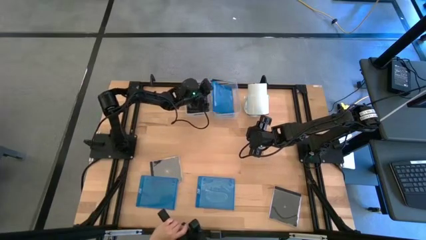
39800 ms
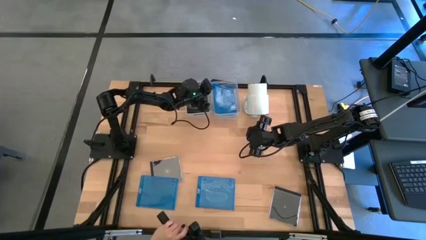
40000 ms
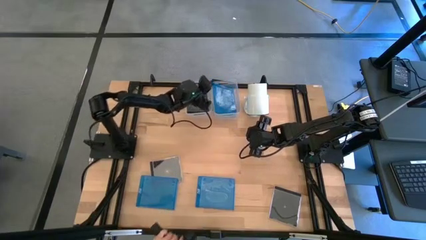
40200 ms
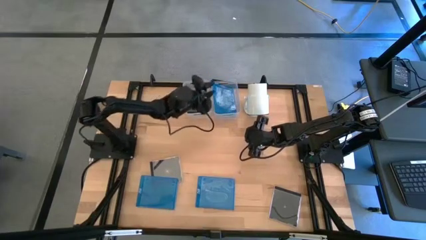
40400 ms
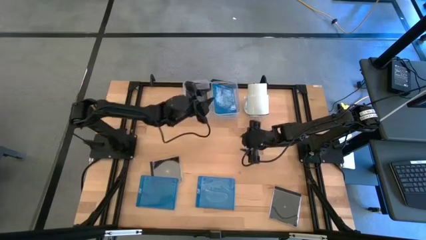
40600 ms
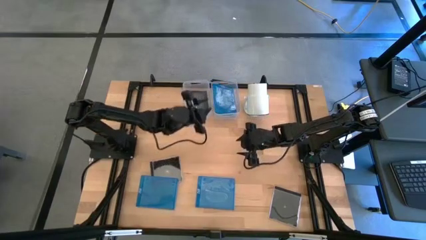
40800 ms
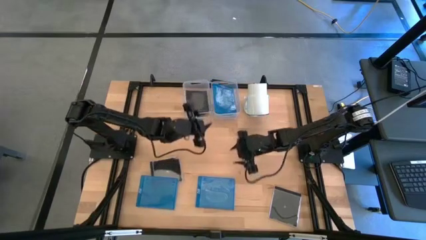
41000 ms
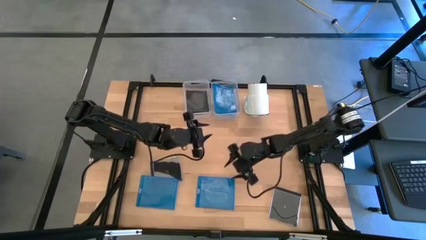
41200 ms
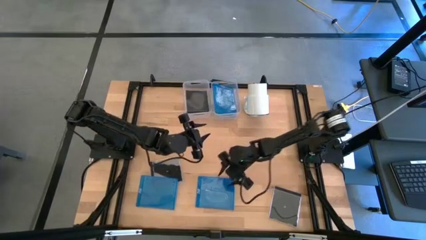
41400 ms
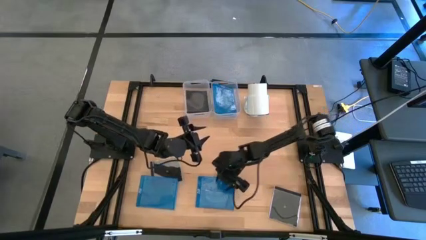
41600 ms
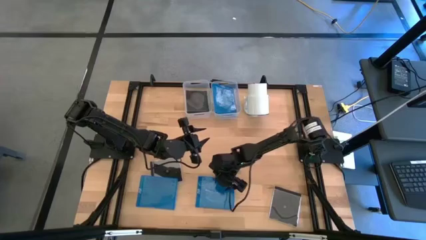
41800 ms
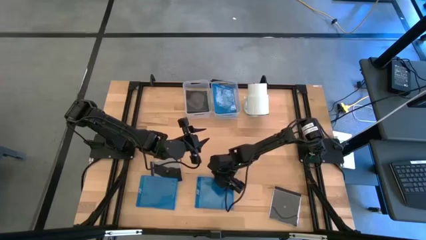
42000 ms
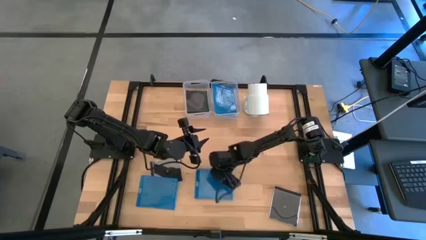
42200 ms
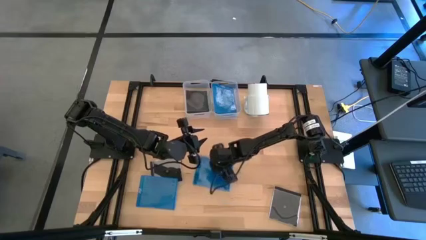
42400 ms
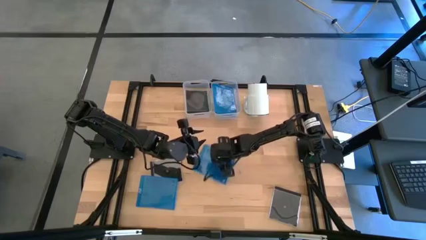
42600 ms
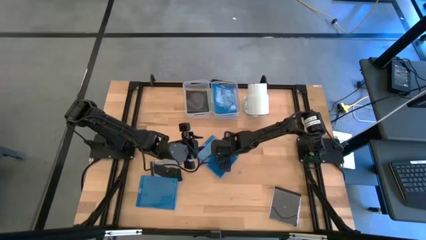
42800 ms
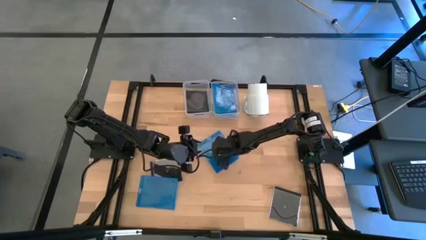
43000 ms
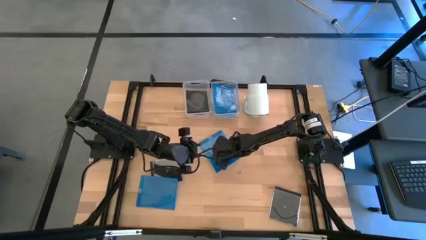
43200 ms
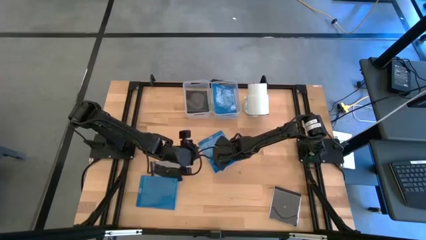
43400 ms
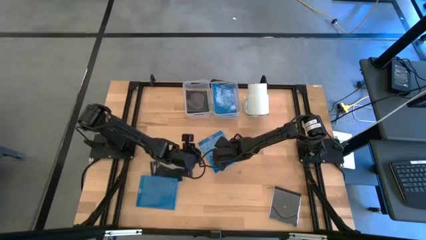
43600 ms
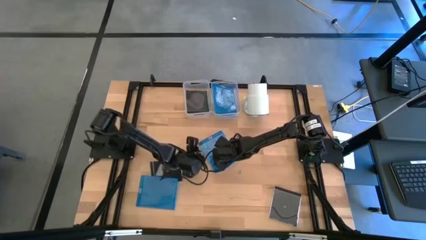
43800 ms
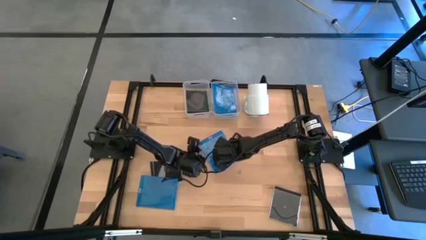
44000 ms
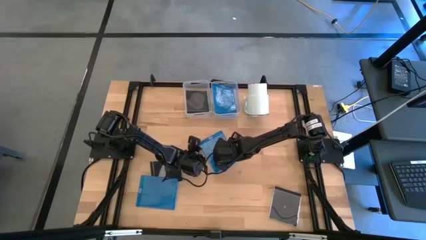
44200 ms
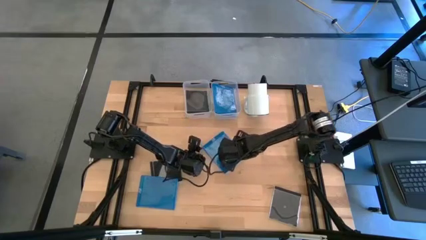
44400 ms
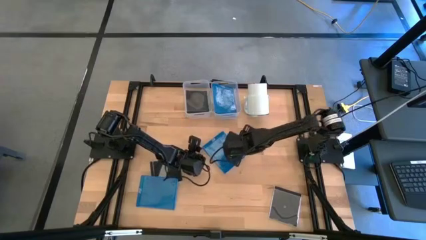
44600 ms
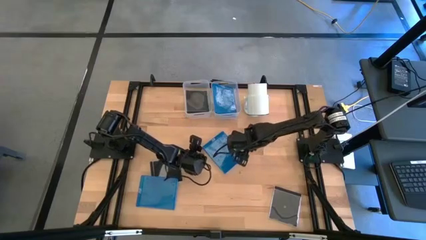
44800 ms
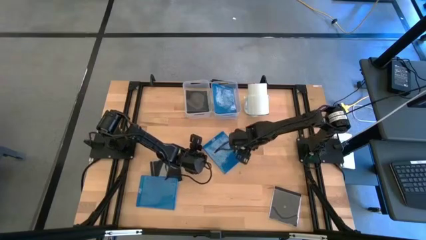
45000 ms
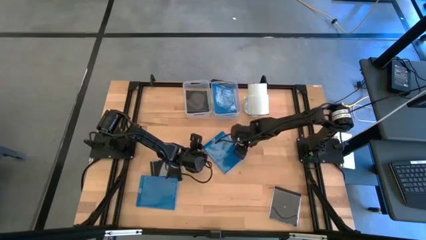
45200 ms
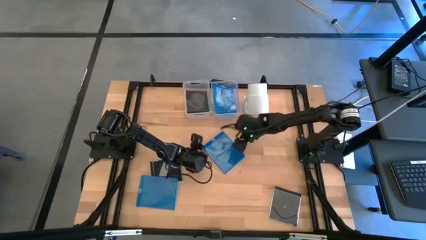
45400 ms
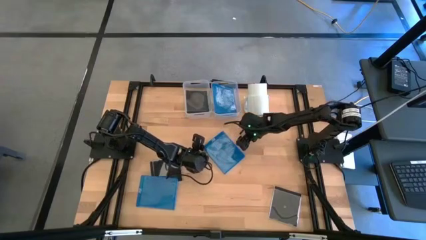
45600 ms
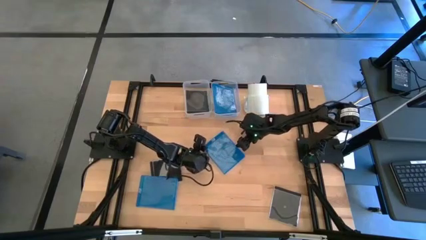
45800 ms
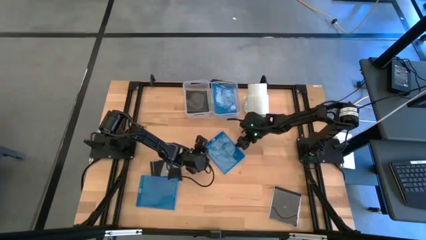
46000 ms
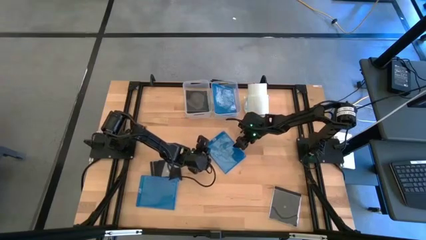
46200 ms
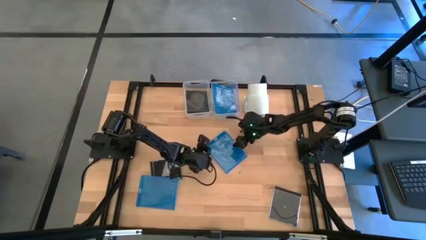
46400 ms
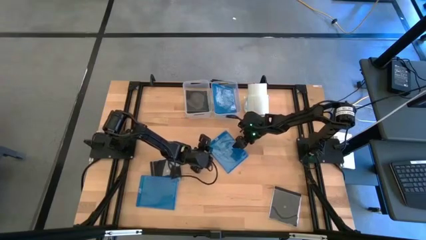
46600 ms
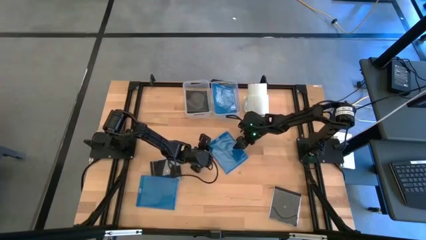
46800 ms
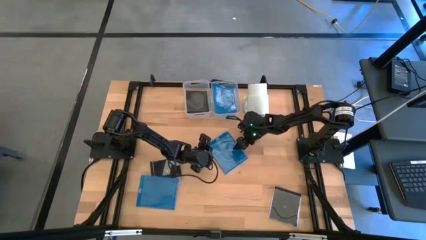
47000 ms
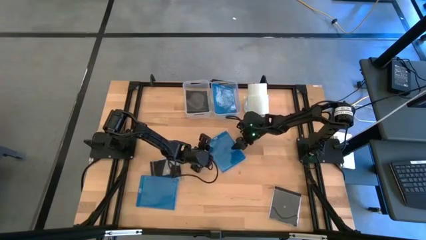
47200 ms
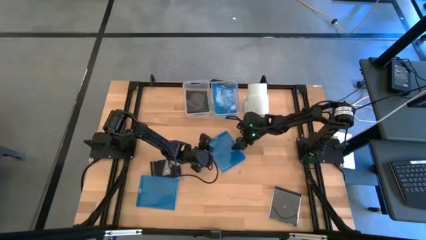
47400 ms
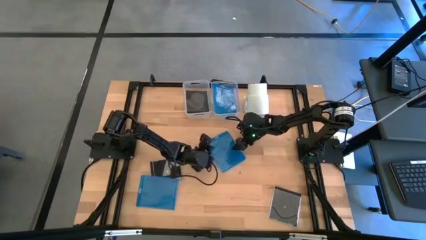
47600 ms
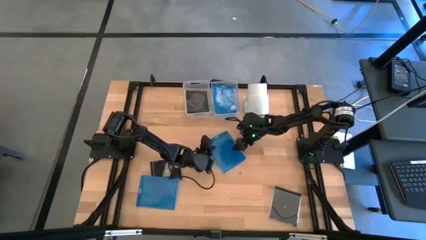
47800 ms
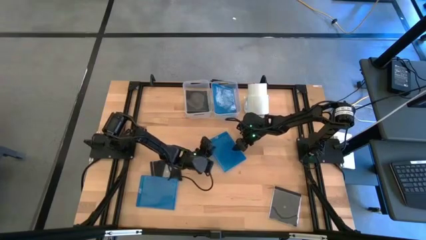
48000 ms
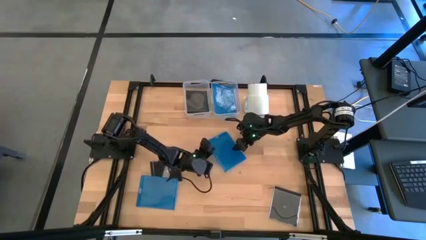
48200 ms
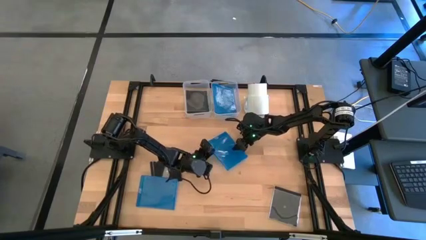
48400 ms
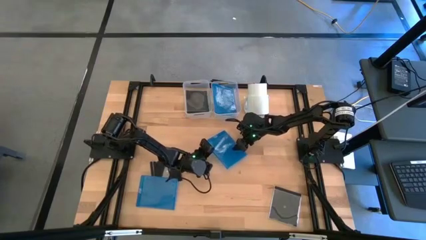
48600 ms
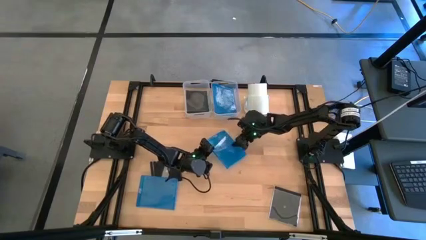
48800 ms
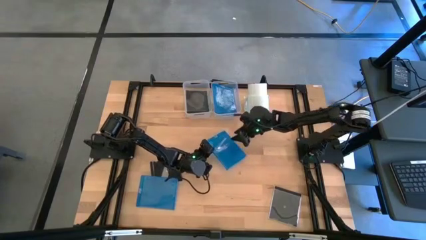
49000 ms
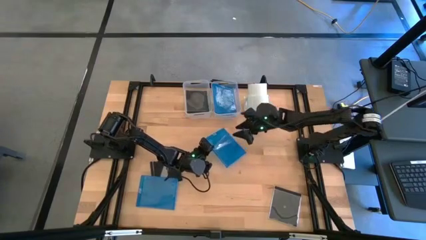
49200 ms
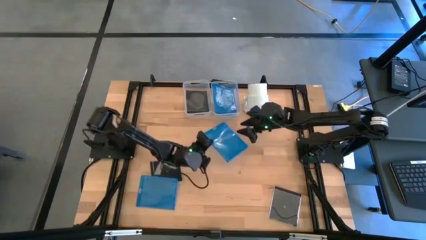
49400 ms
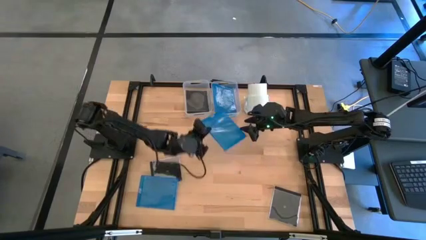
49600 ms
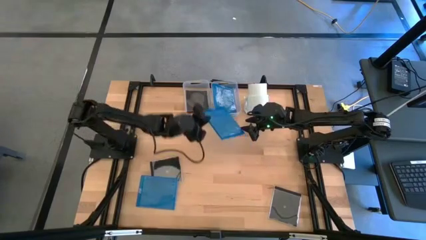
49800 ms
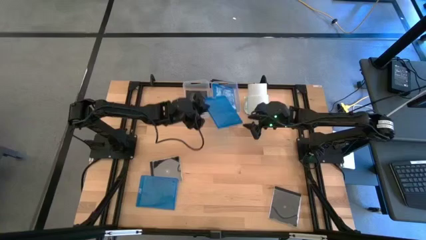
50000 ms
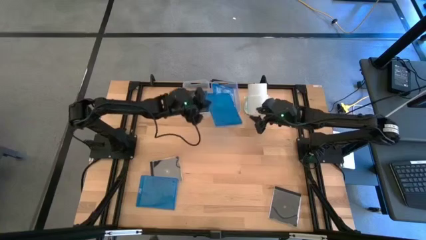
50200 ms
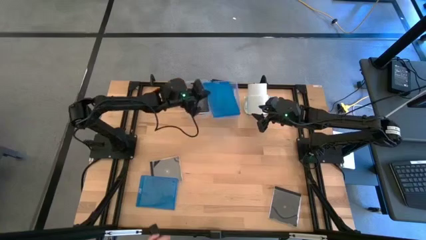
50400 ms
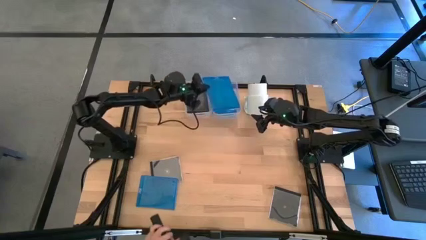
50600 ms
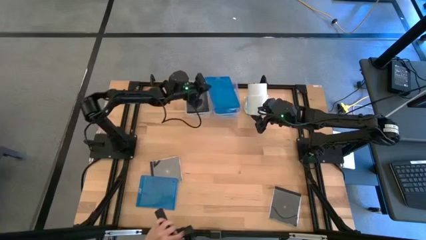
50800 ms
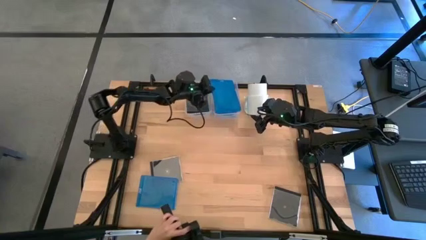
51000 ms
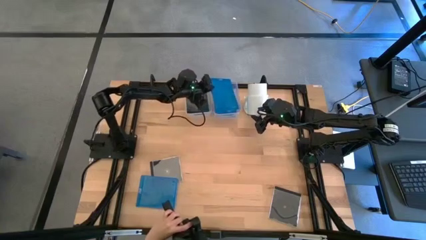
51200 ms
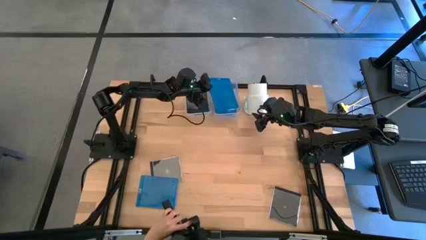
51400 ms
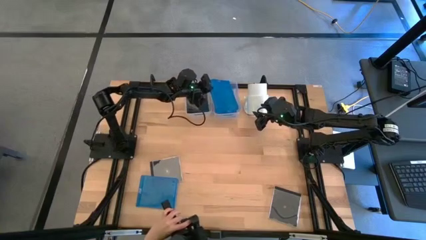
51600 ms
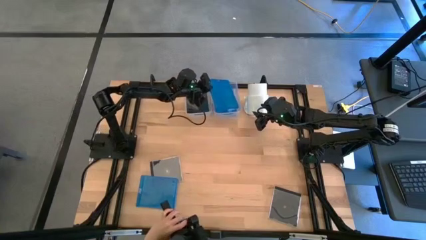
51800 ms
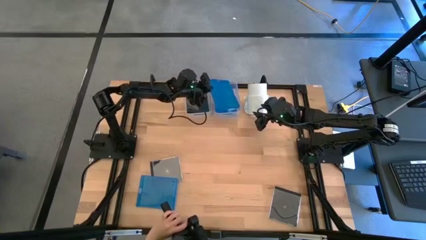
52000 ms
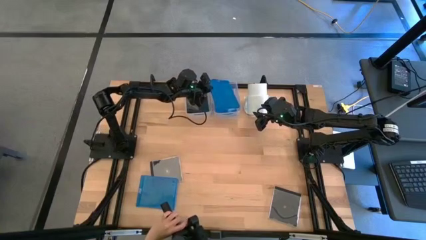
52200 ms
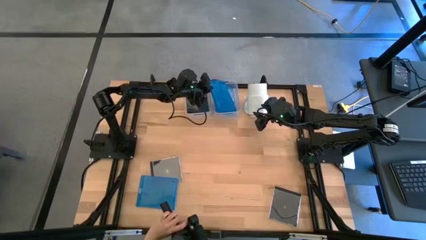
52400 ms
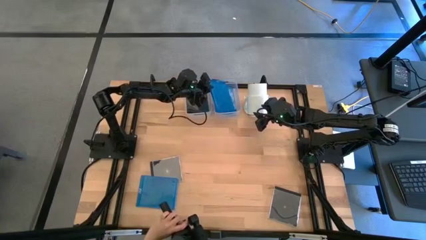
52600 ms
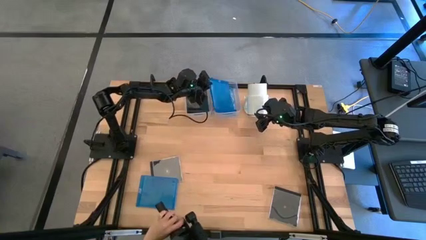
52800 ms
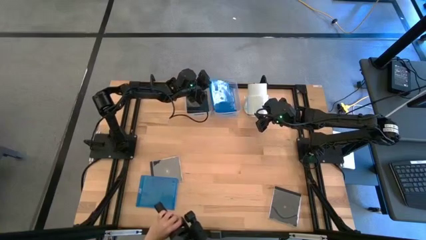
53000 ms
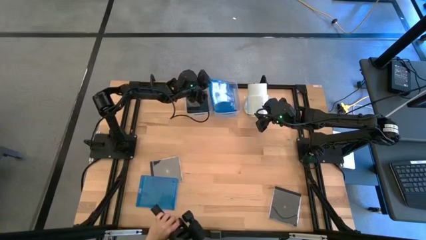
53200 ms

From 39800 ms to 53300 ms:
Task: Pick & place jewel cases by type
Put the right blue CD Case into the right transparent bin

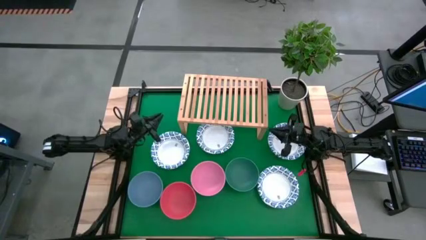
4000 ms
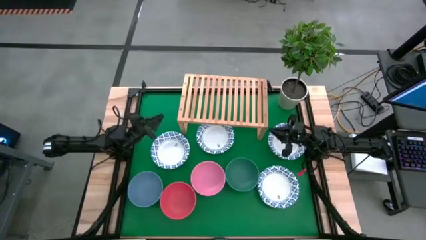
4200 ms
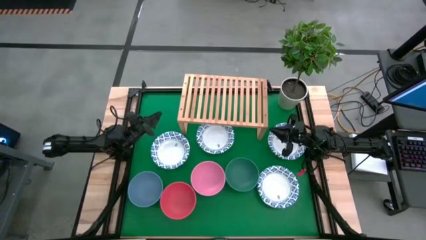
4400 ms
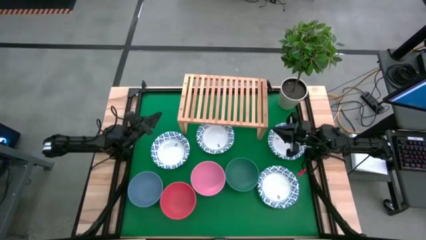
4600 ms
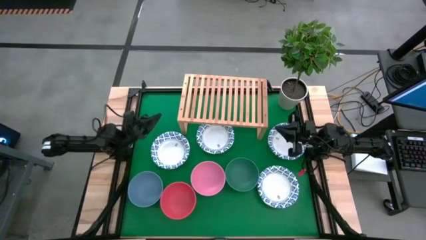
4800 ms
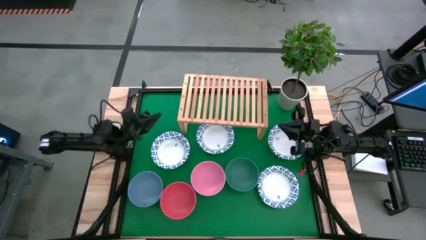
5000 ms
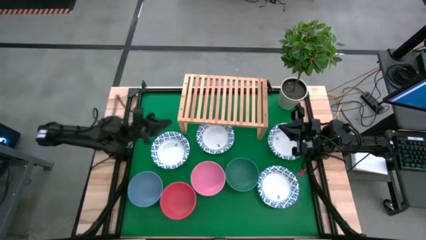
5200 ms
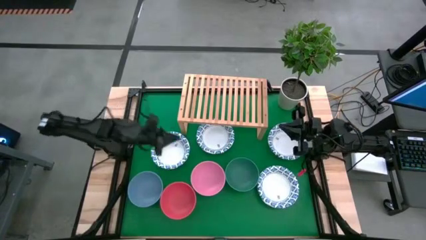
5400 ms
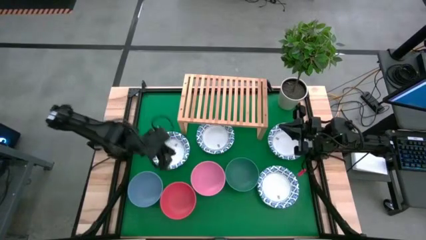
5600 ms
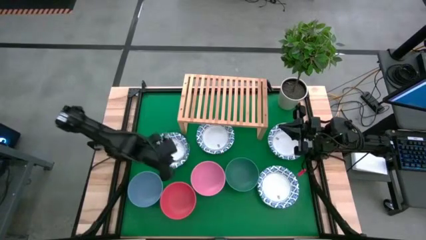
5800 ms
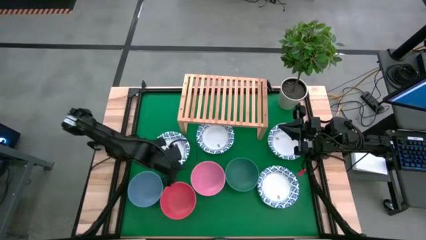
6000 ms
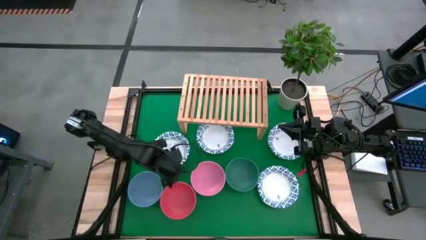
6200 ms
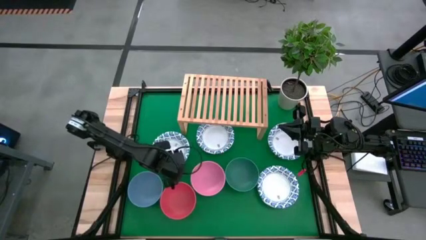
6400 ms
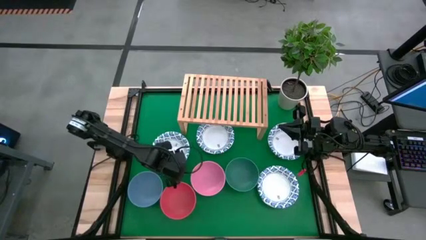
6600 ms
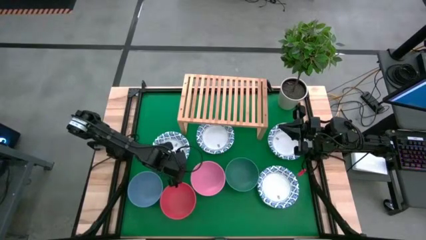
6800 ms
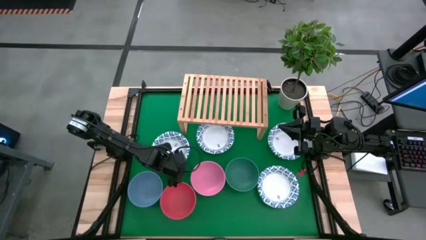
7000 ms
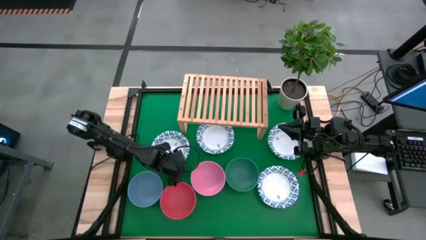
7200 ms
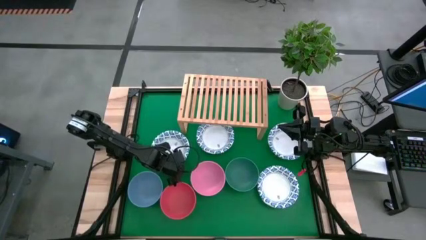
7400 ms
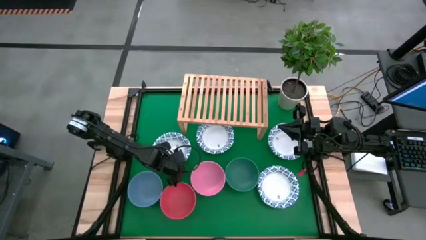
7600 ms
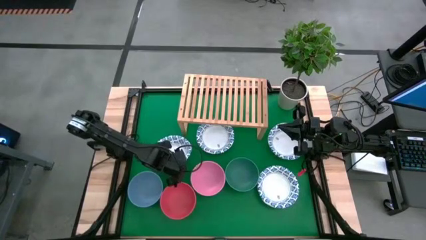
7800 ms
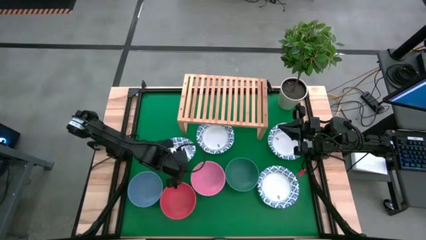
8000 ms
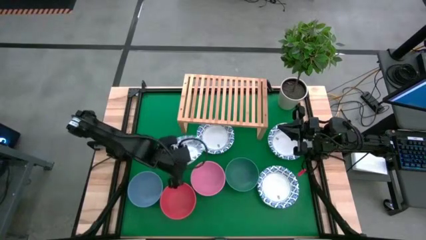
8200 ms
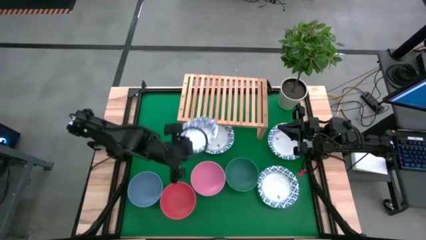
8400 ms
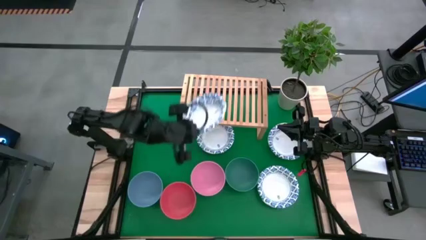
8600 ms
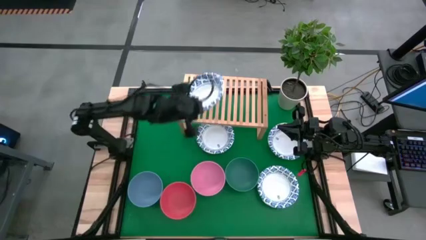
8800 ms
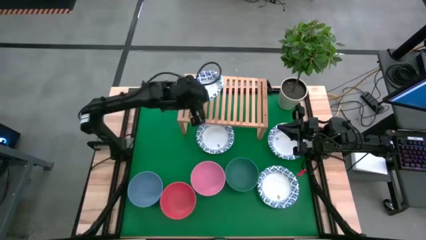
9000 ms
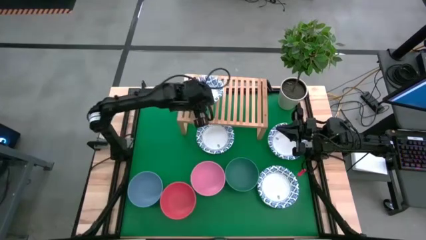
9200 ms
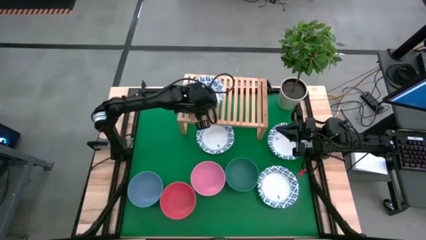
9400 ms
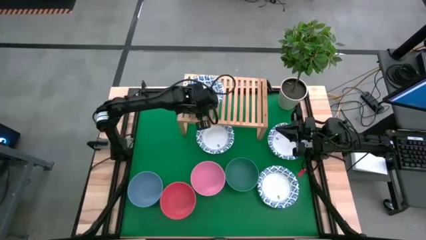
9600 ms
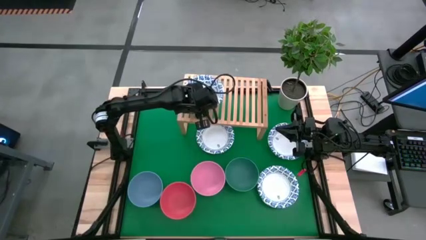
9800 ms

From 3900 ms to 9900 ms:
Task: Place and stack bowls onto a shelf
Put the white patterned bowl on the shelf
